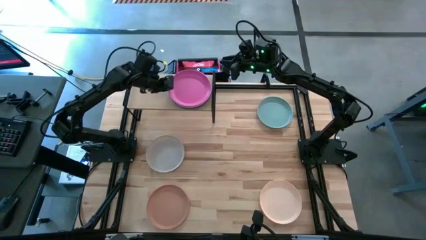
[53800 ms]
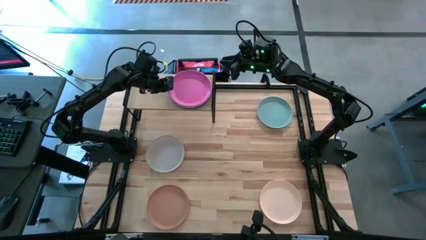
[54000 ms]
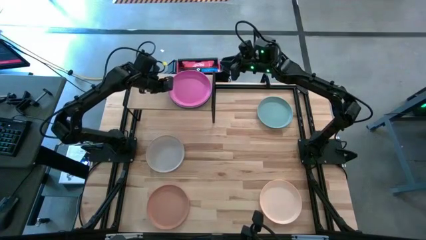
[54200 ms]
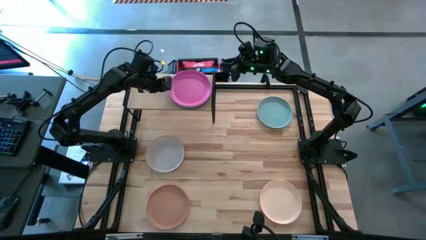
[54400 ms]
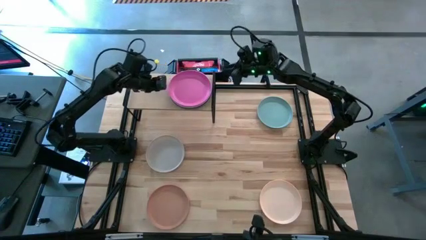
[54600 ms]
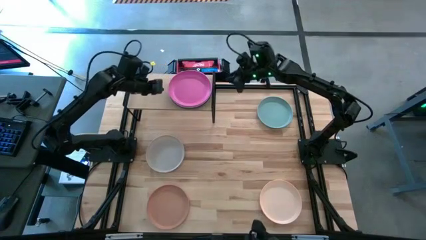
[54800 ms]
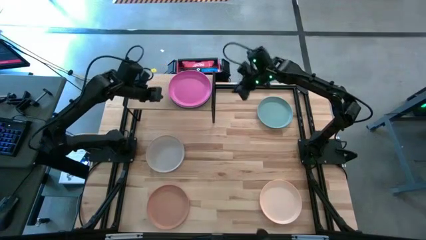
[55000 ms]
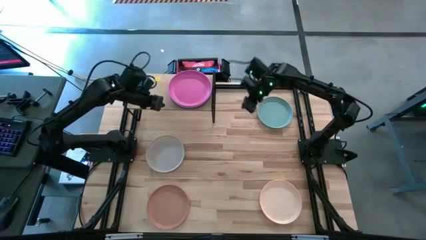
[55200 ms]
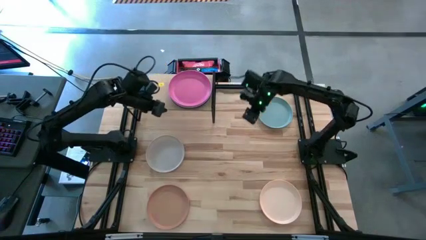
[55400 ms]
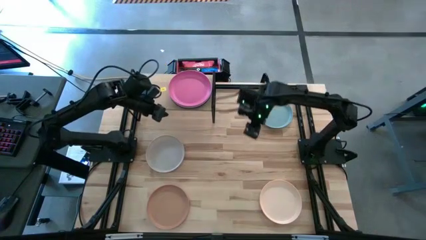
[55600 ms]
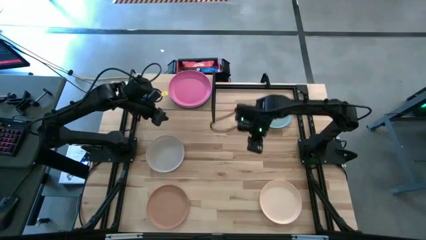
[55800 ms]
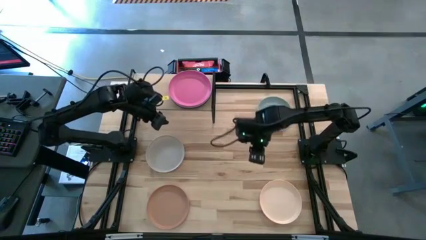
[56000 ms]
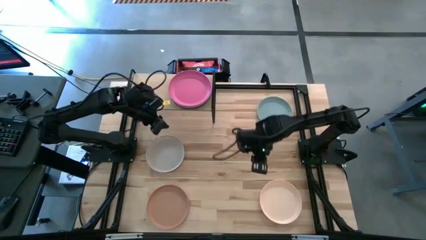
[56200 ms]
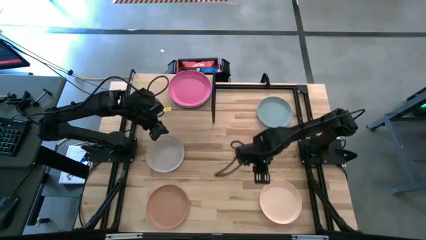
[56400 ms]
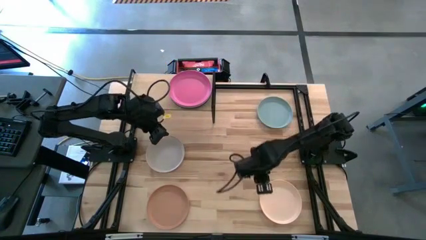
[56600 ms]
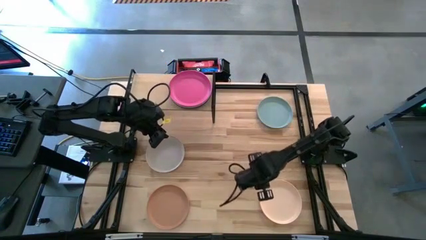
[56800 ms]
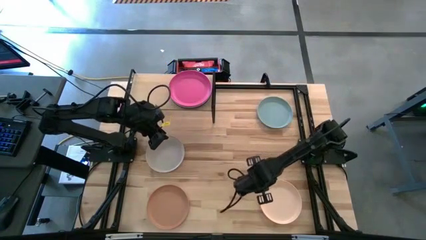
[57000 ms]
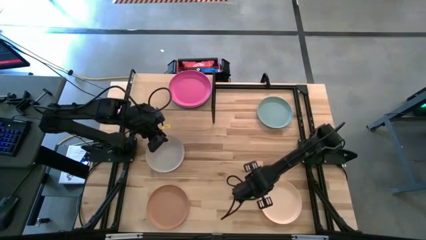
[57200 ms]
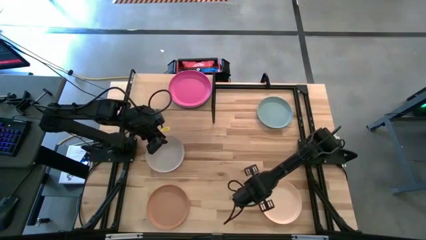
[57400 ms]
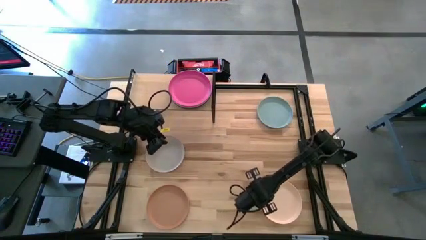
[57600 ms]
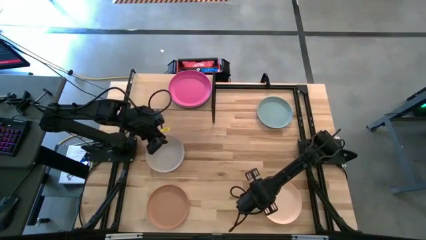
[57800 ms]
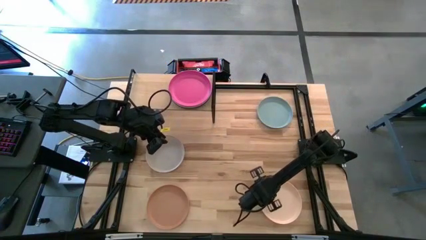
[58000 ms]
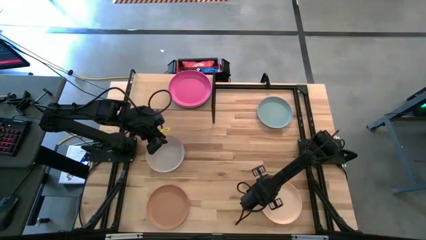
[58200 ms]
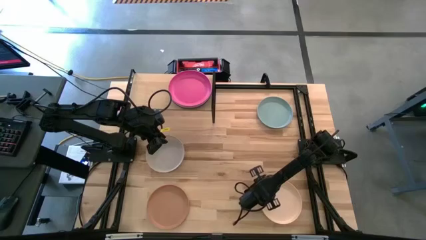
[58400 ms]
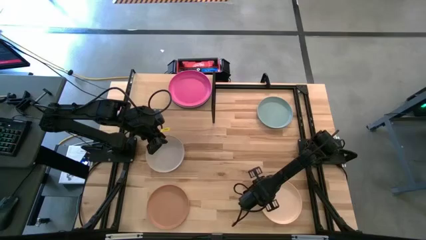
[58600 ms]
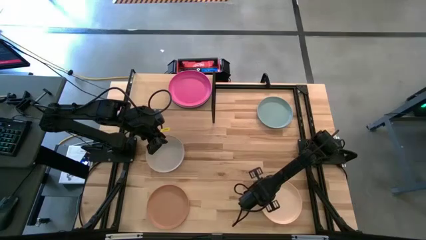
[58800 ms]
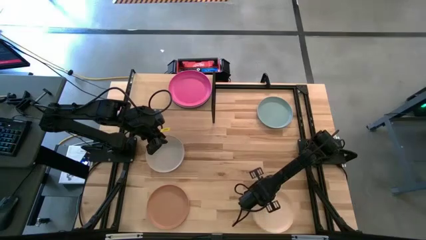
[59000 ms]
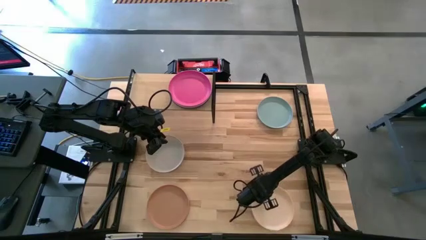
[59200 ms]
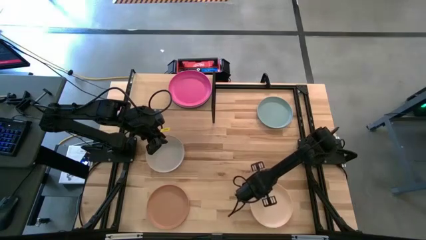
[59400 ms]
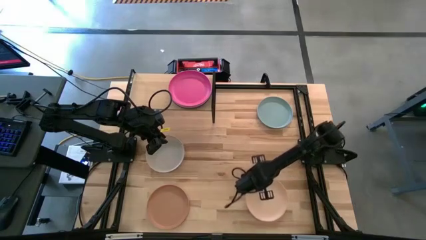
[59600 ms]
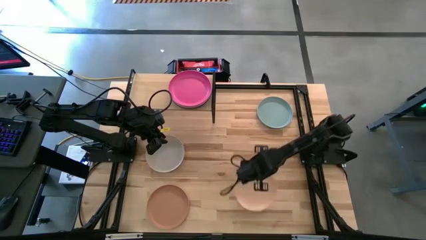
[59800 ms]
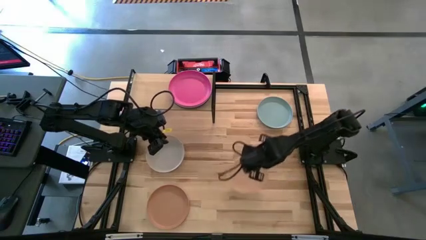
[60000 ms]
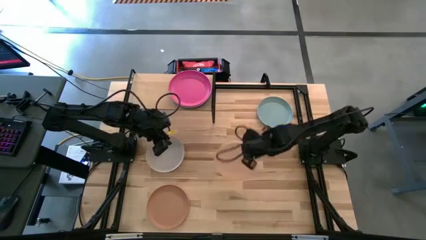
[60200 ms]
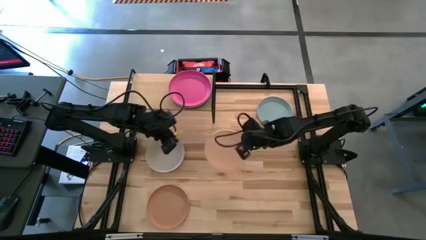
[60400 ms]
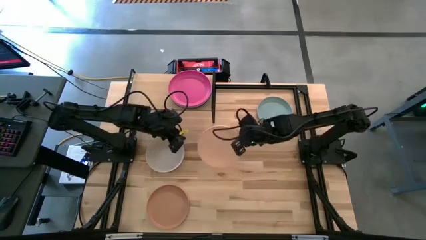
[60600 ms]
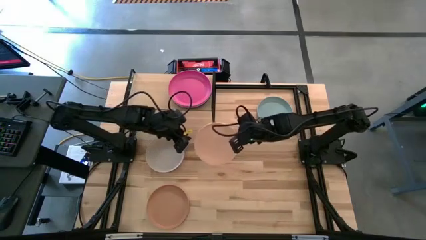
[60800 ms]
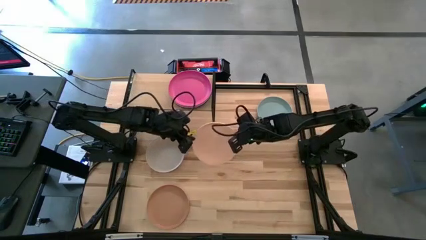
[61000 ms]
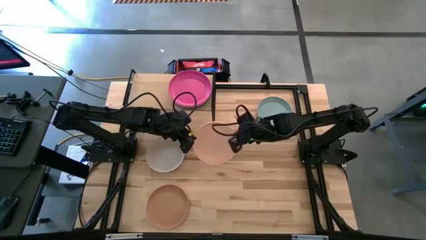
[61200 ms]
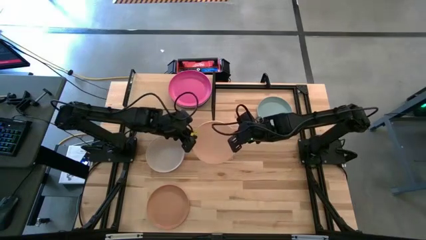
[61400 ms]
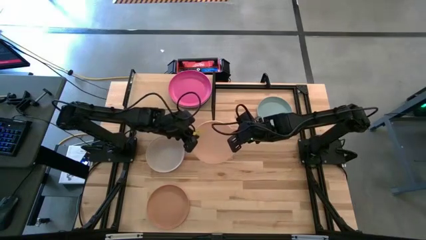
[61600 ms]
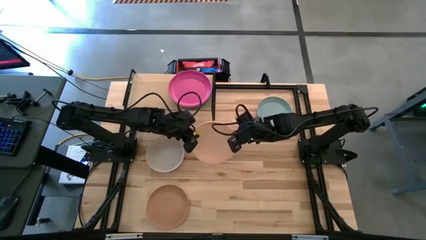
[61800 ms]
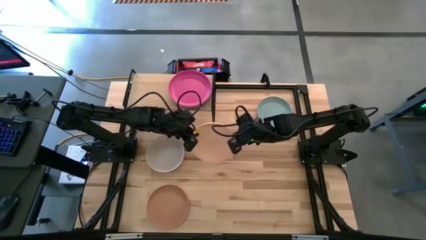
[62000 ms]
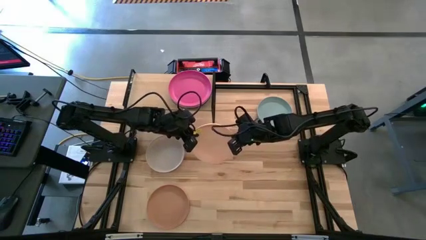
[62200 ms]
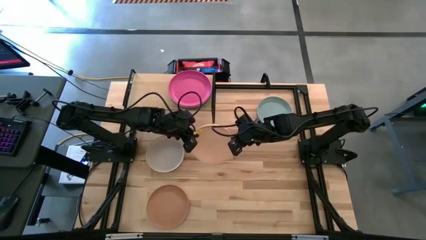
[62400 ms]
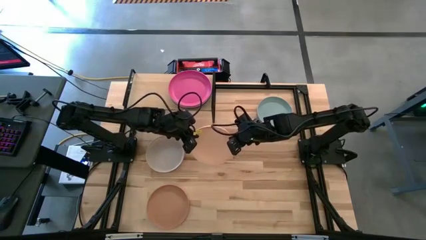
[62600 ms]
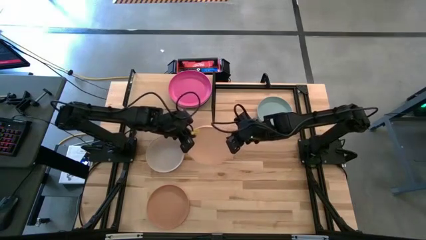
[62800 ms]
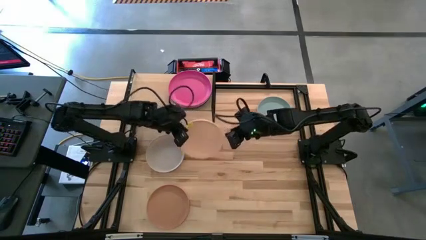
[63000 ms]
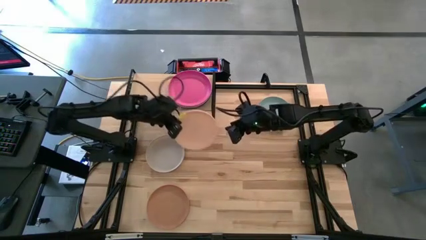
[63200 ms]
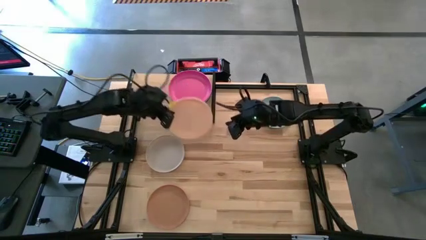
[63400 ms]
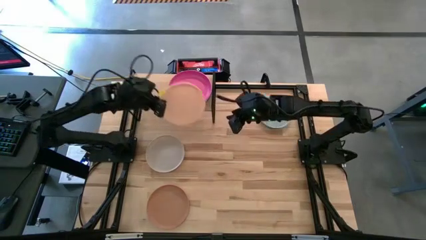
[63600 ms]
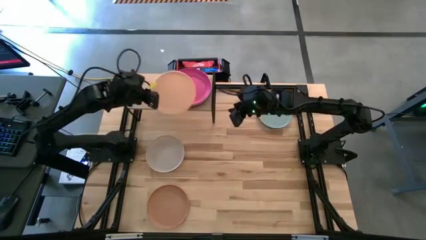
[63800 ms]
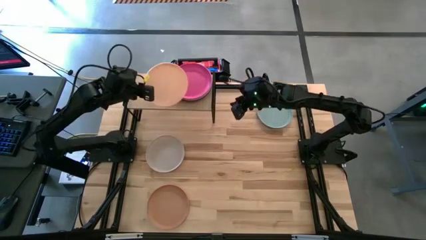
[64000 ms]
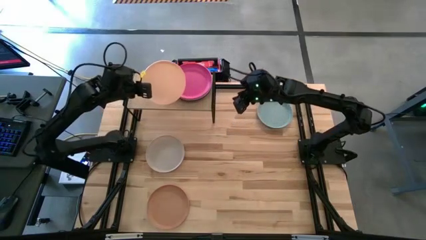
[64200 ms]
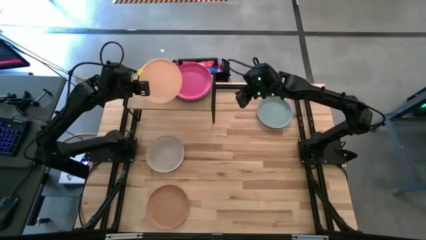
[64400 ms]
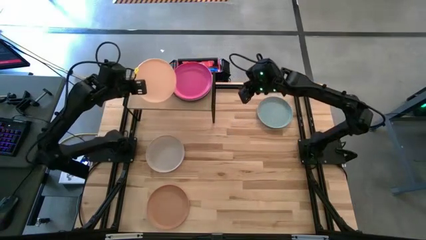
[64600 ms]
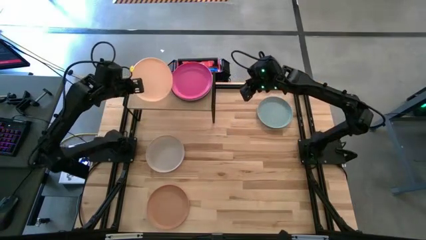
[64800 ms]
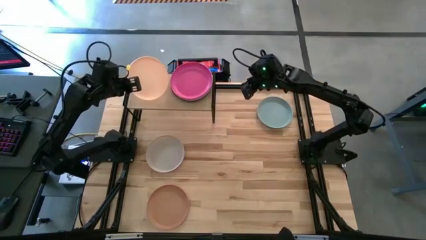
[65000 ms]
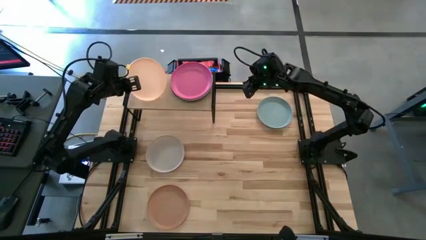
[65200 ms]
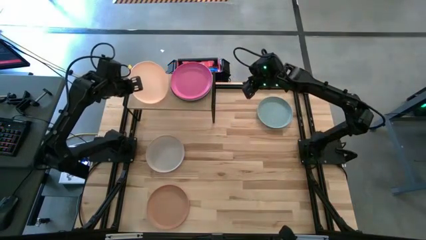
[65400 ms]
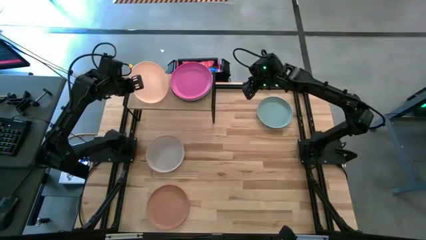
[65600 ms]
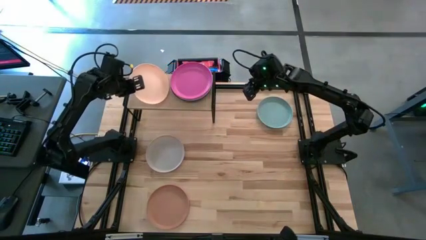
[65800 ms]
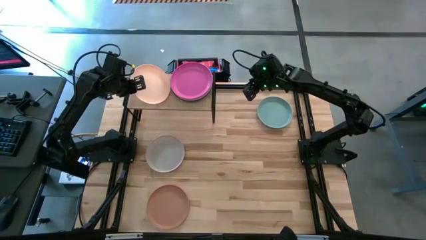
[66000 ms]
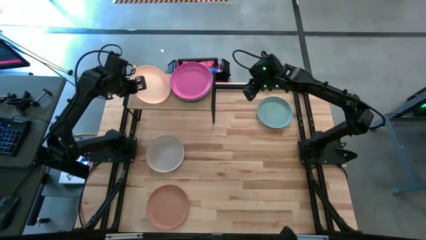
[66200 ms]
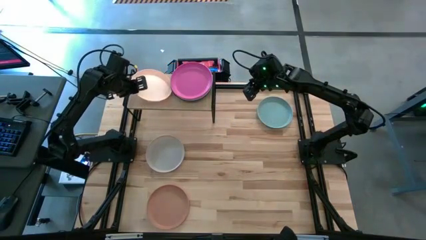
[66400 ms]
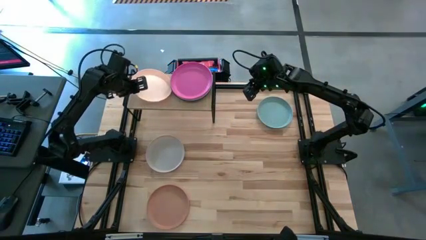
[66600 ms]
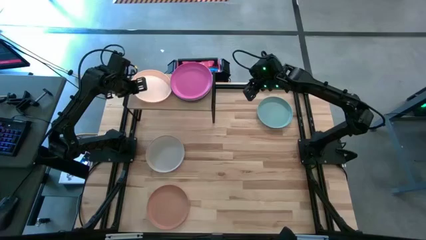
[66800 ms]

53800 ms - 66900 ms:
Task: Place and stack plates onto a shelf
Put the light pink plate on the shelf
